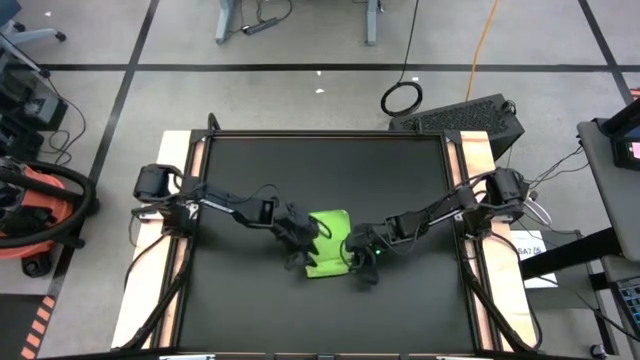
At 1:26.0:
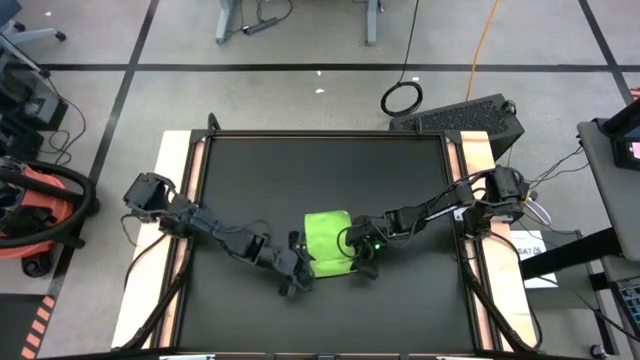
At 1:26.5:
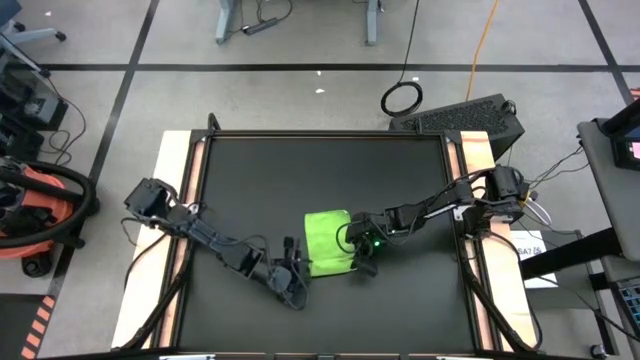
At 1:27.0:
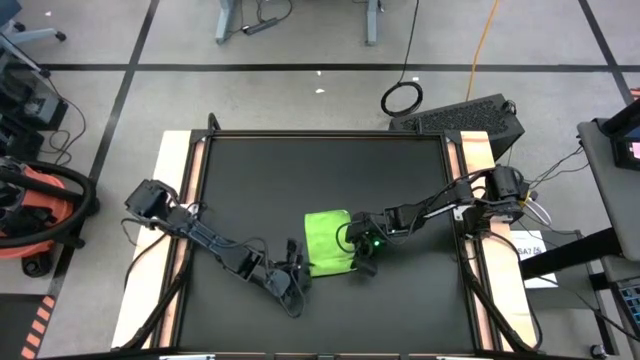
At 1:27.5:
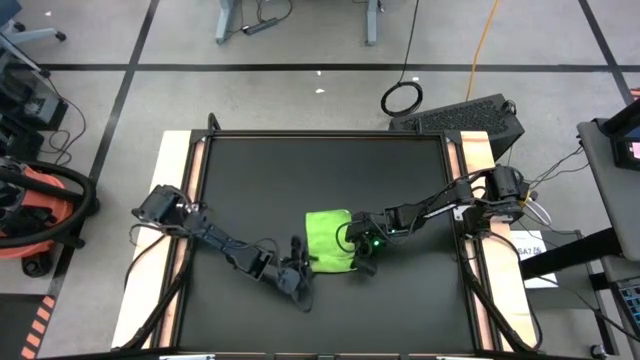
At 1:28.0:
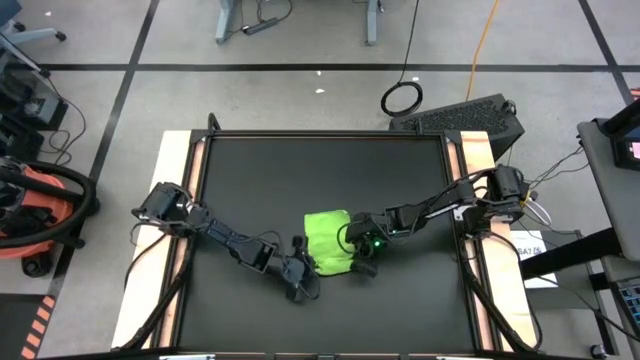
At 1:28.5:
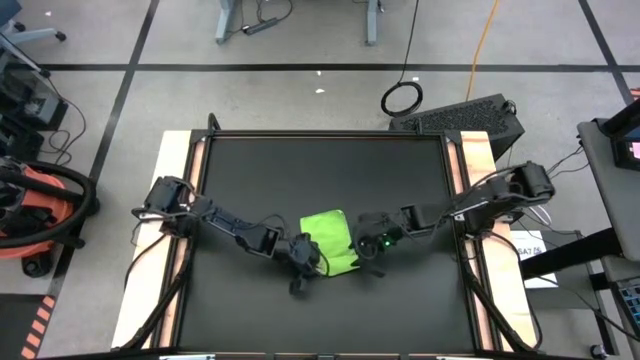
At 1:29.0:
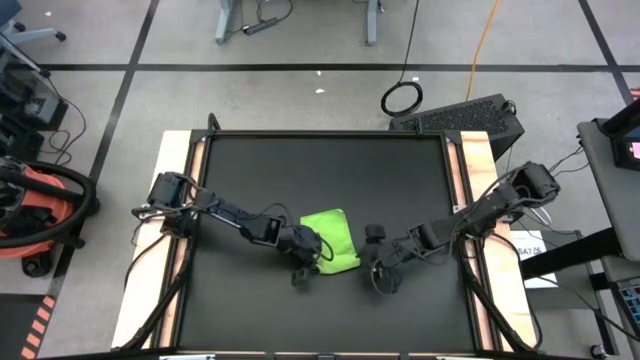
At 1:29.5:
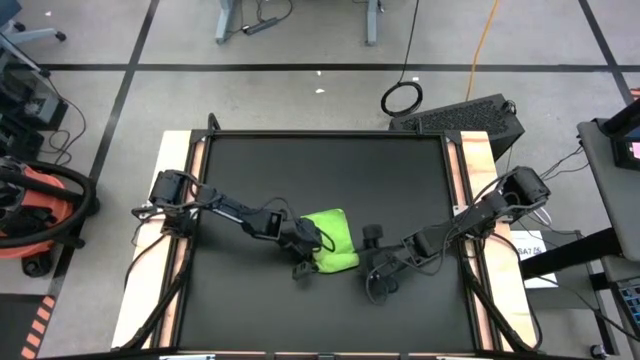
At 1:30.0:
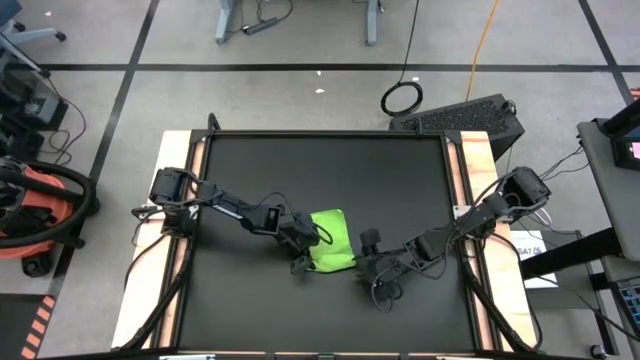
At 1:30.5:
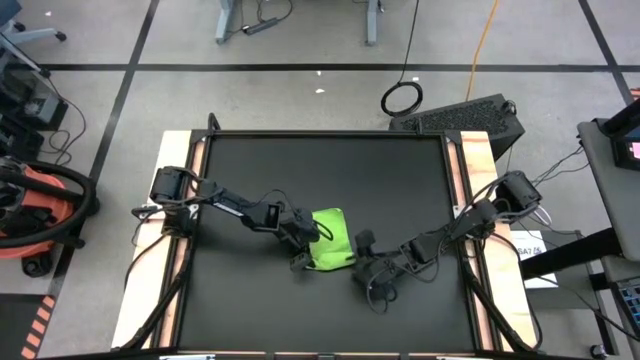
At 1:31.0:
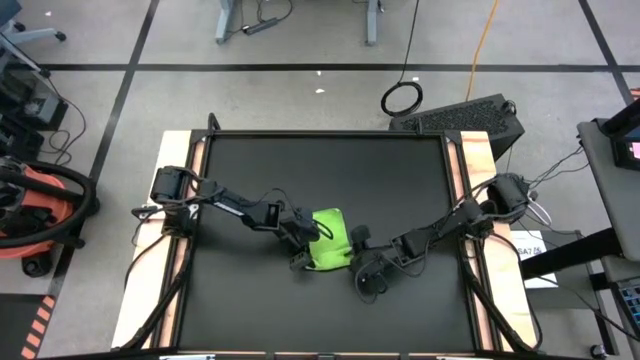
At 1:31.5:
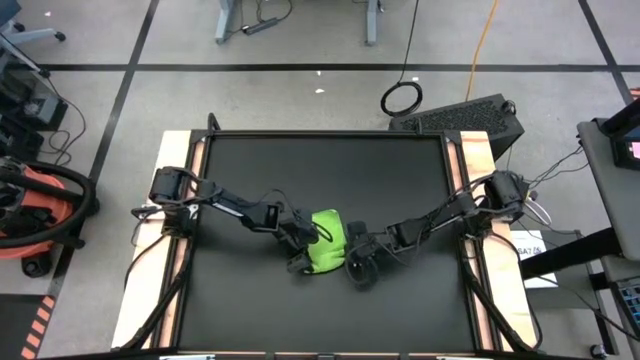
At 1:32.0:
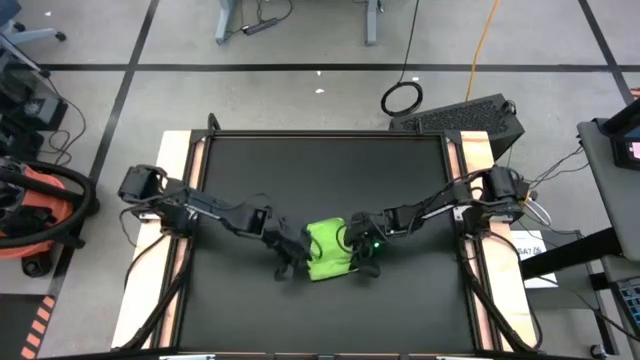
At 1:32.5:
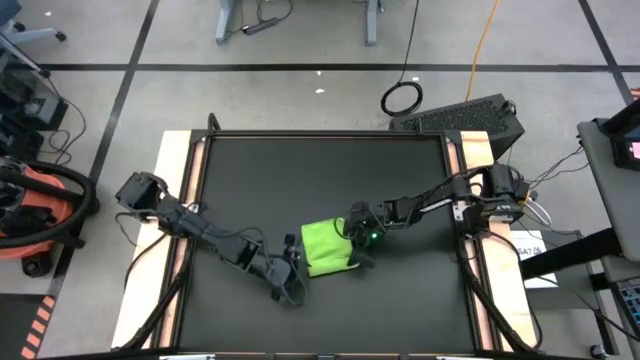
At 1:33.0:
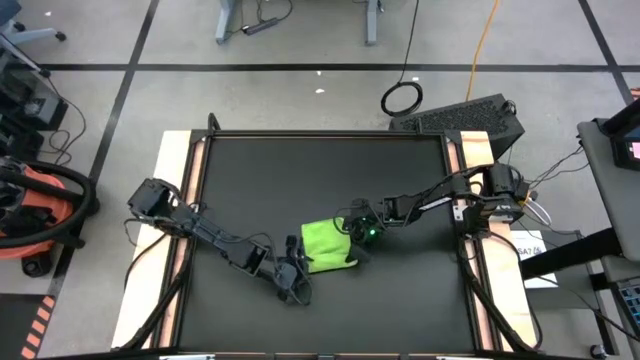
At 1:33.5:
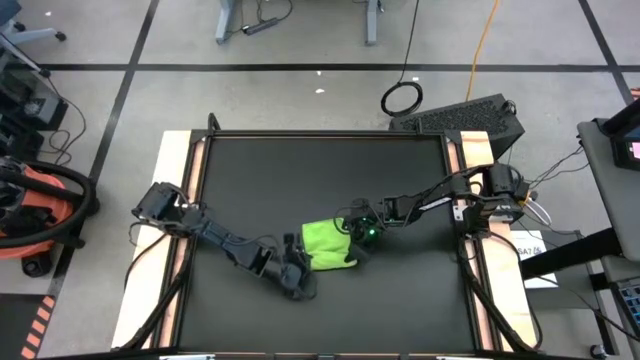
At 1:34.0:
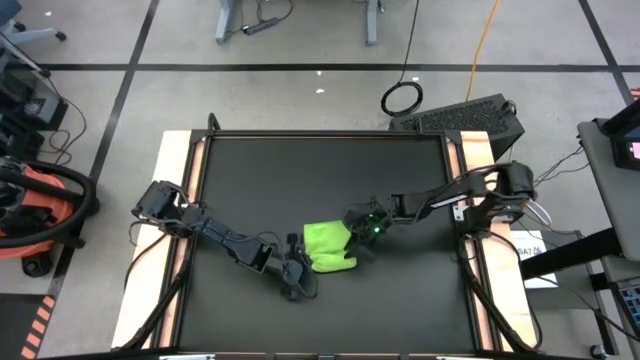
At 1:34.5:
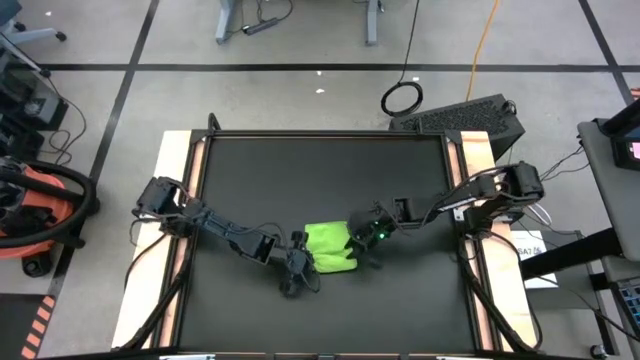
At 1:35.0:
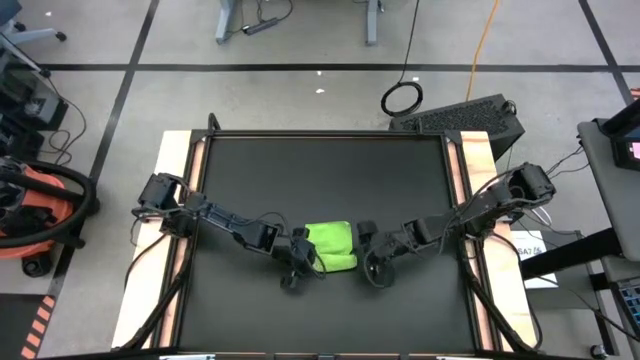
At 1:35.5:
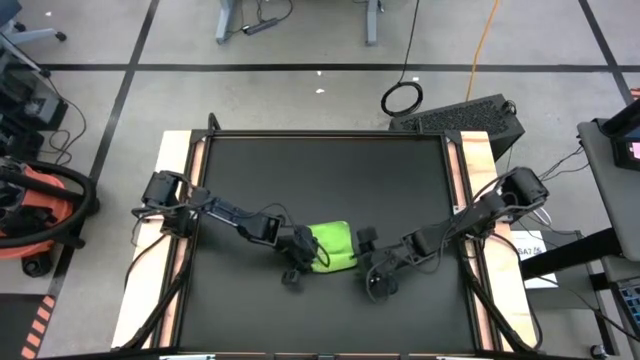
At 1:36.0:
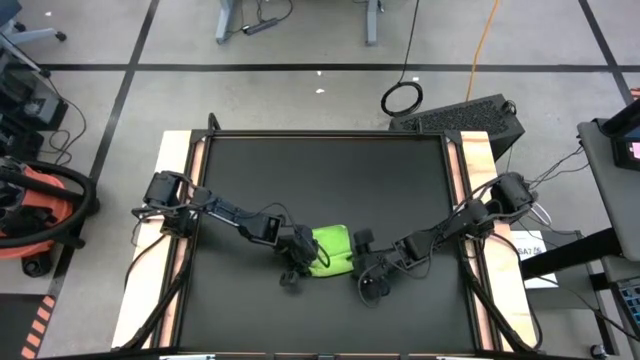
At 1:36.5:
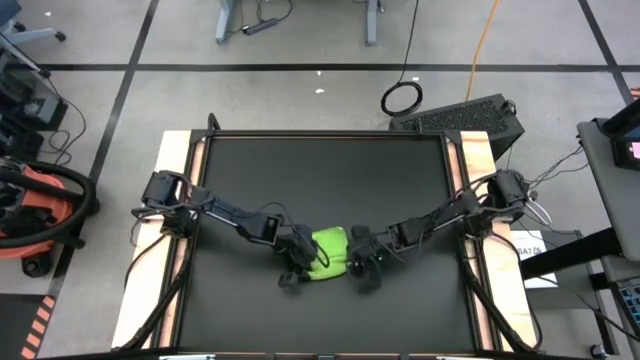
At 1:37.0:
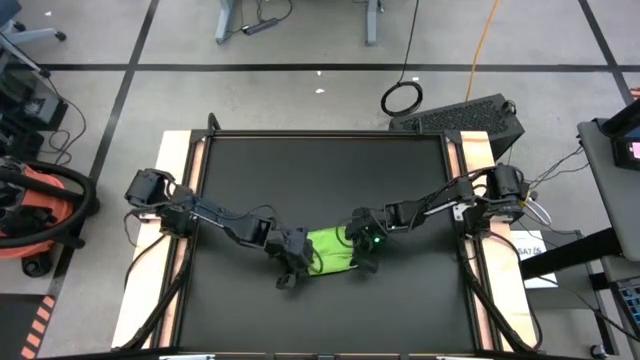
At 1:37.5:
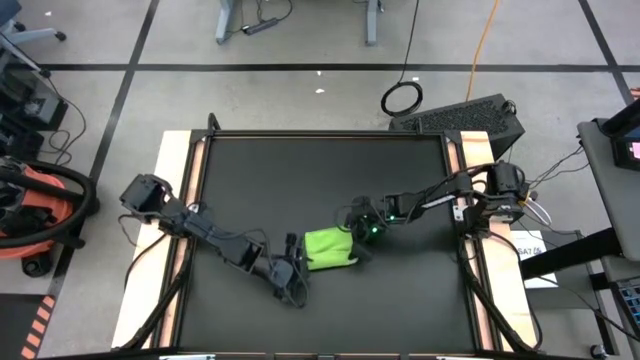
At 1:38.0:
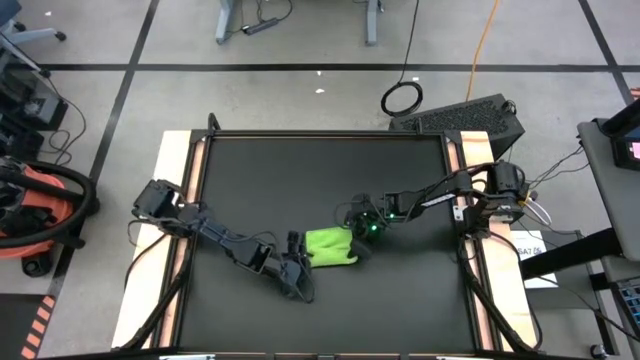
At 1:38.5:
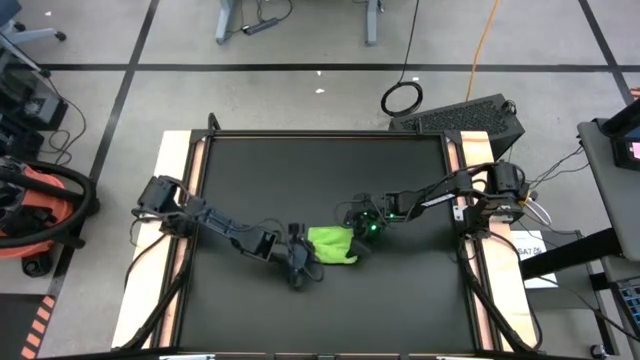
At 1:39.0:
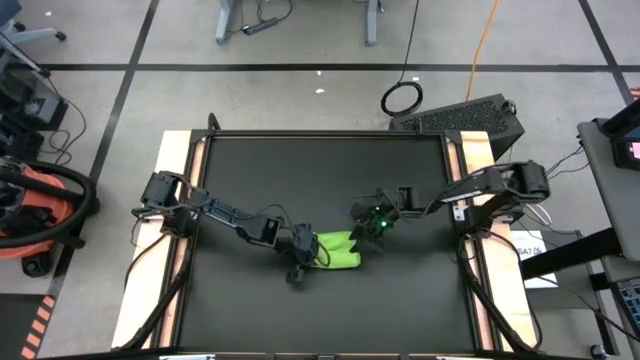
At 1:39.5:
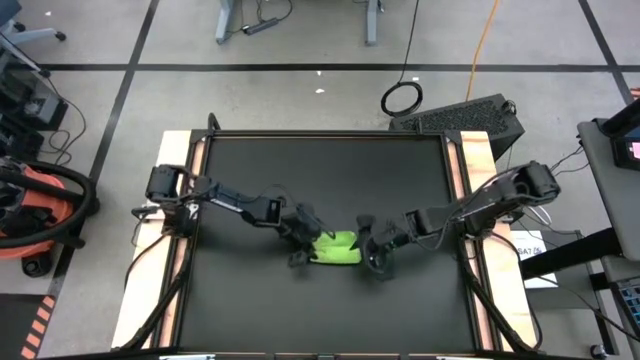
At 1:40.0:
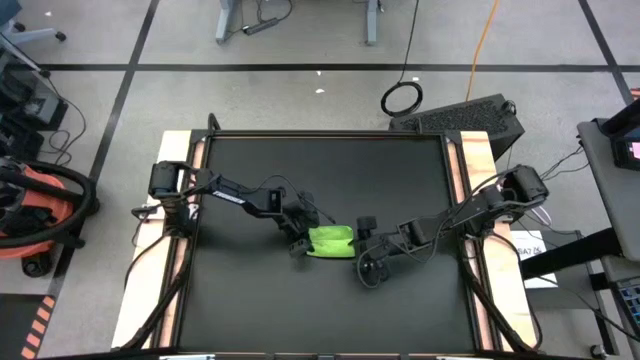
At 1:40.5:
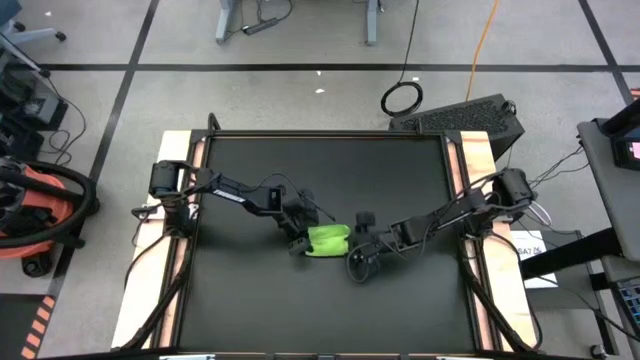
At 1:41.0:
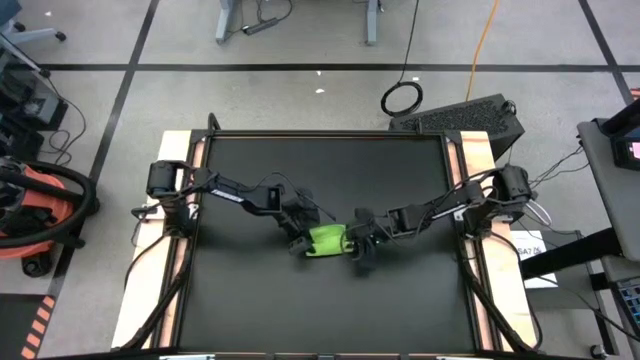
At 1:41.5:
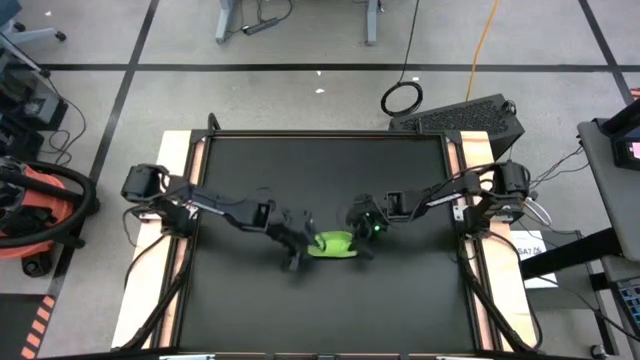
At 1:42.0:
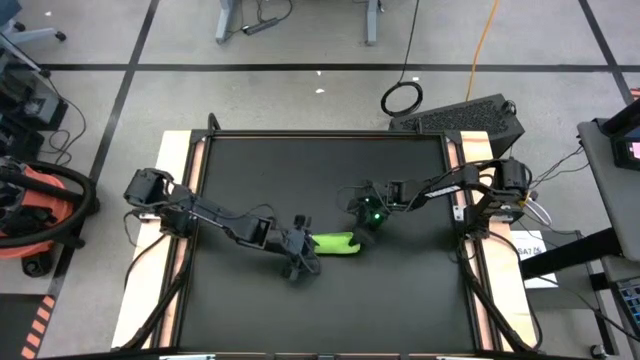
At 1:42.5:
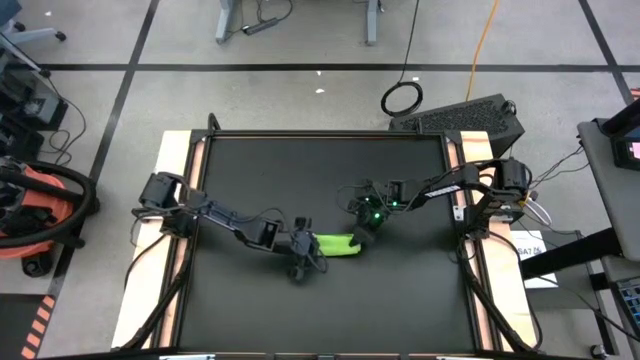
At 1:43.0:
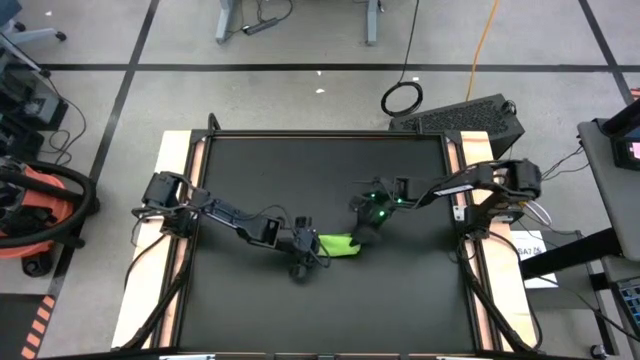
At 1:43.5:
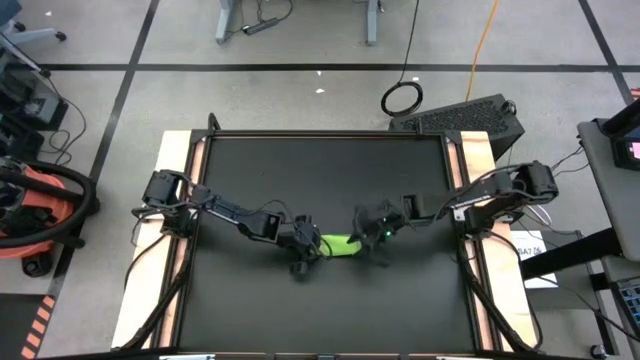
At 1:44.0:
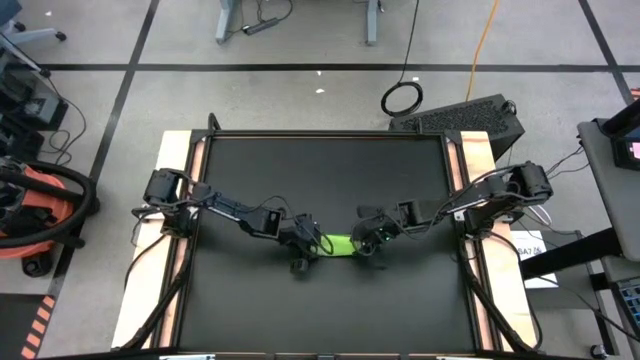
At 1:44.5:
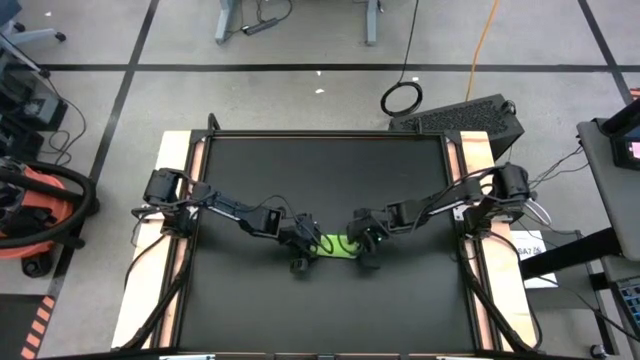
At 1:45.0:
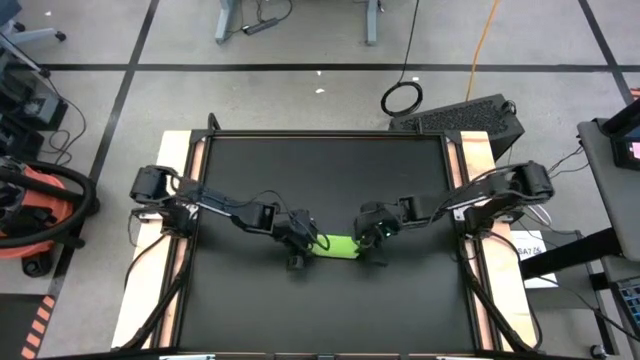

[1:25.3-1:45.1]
Task: Roll towel
Roll the green towel

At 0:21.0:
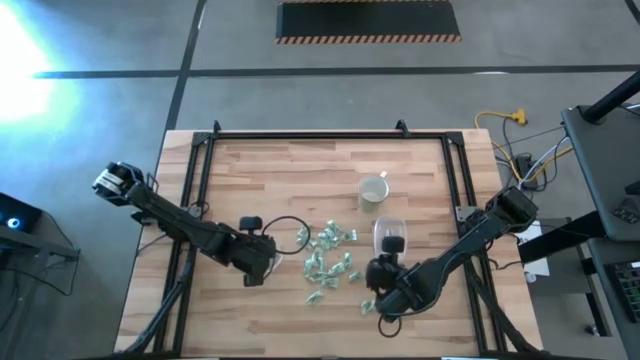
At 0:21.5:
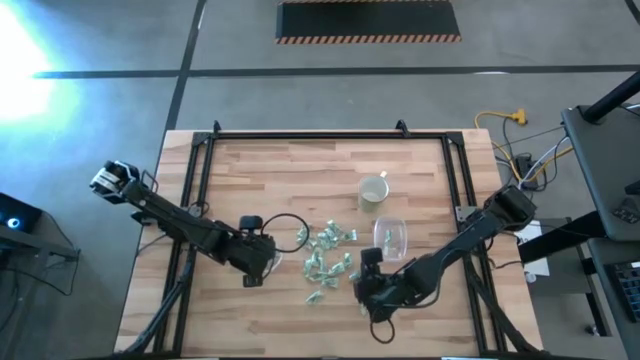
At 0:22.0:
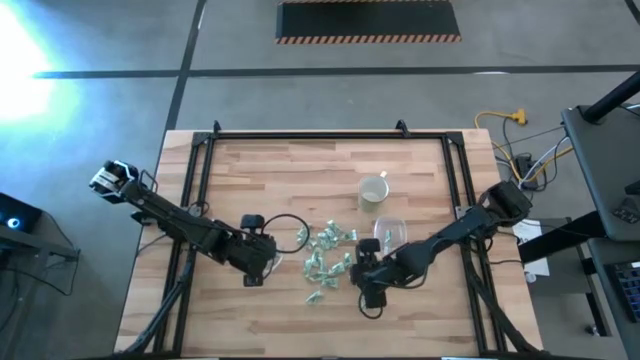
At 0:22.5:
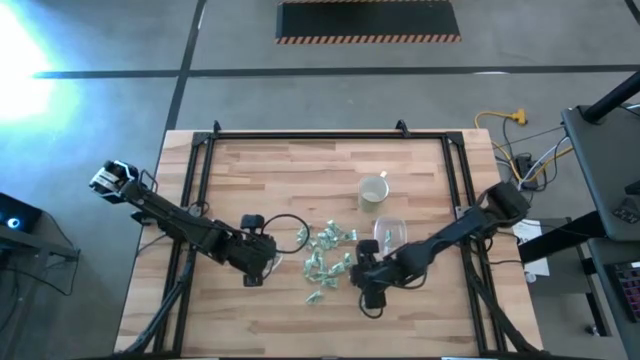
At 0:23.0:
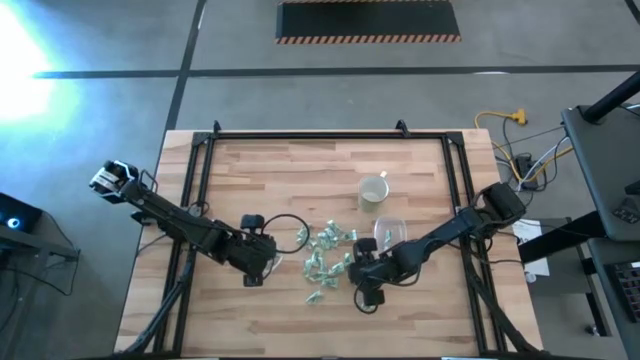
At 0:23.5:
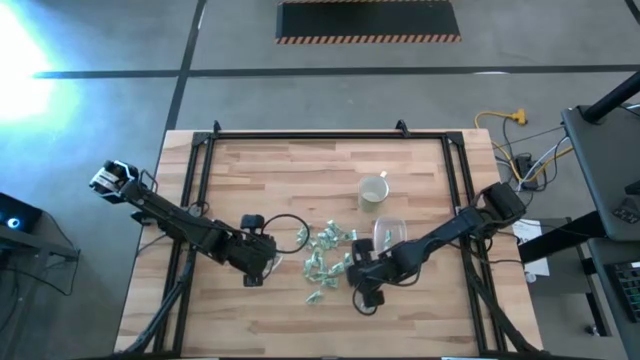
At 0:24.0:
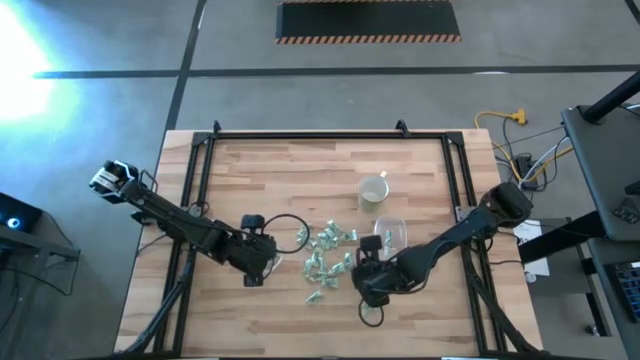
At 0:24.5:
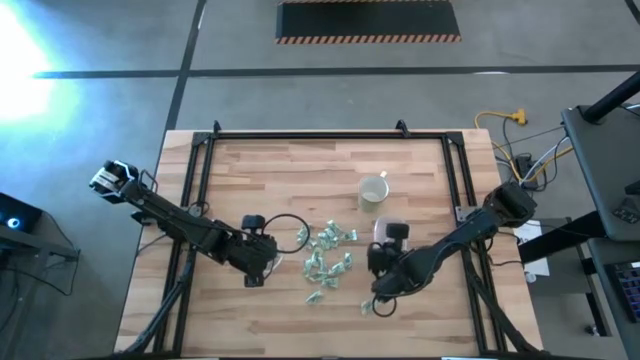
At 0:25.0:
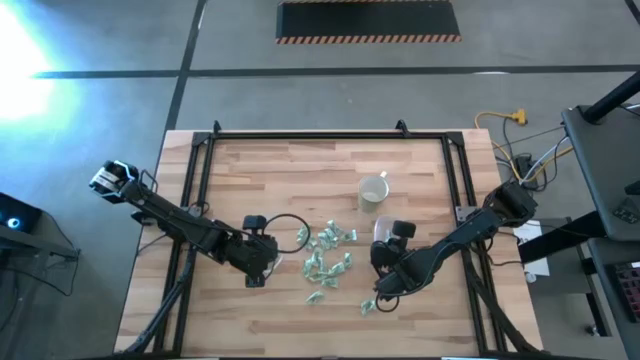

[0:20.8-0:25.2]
Task: Pick and place Stevia / Truvia into bins
Put the stevia packet into the right transparent container
